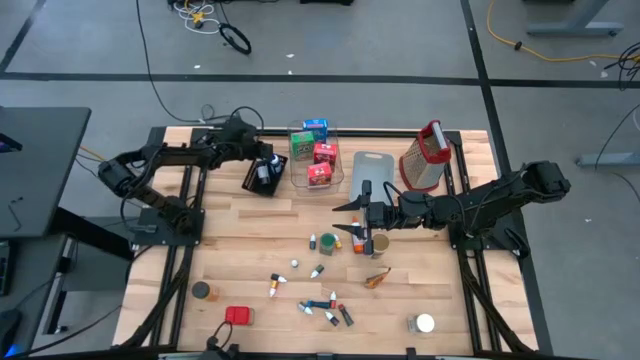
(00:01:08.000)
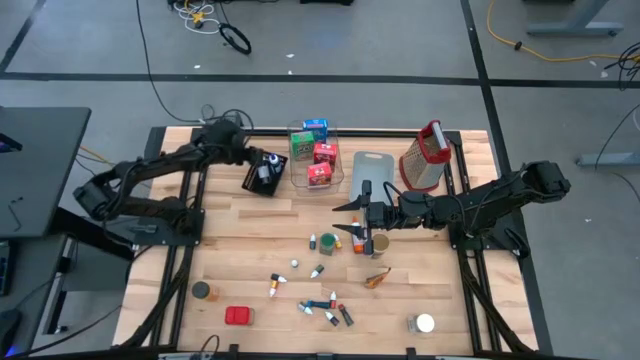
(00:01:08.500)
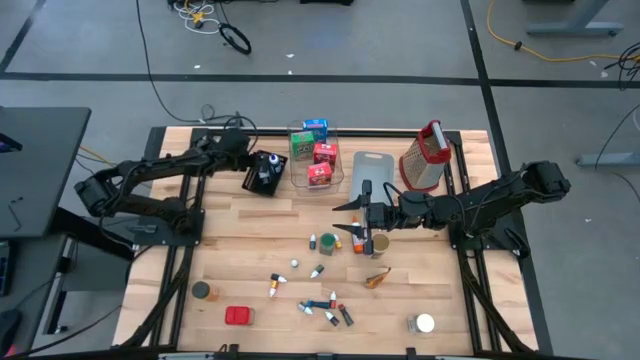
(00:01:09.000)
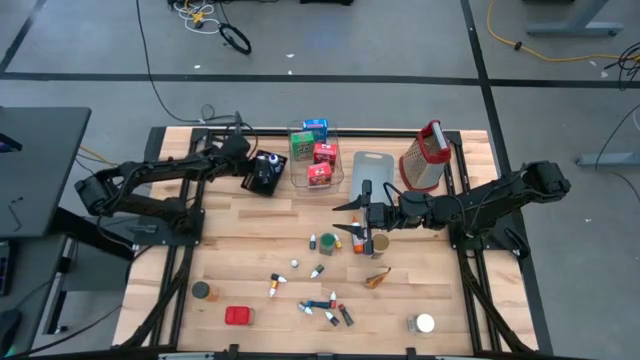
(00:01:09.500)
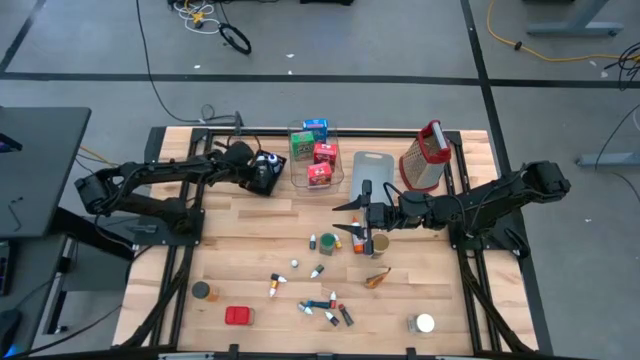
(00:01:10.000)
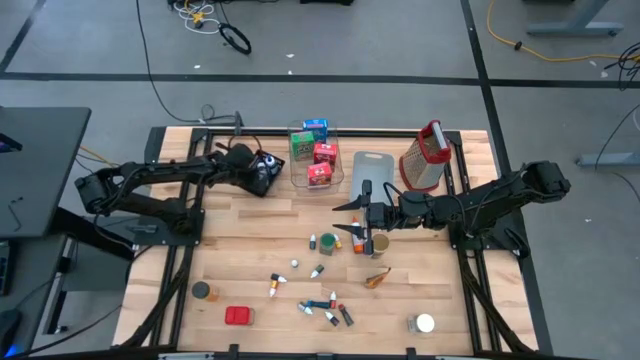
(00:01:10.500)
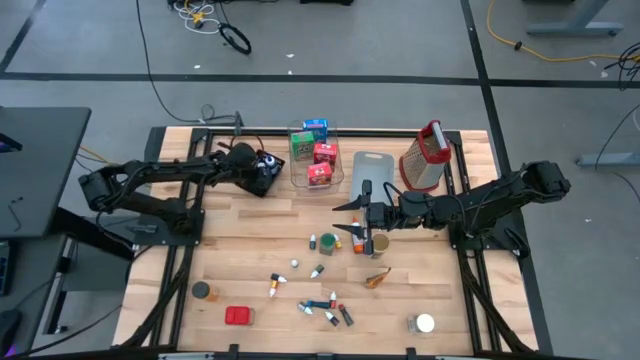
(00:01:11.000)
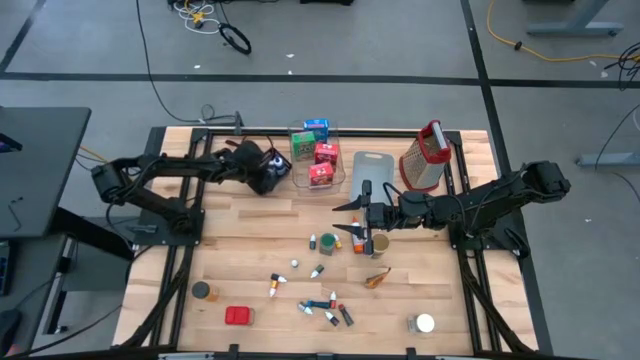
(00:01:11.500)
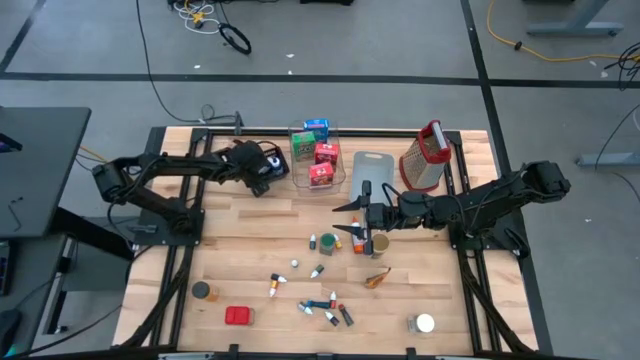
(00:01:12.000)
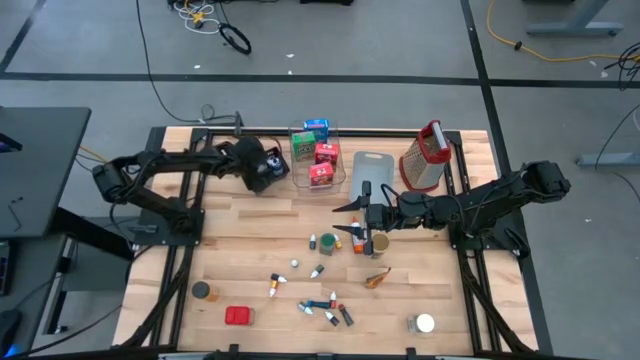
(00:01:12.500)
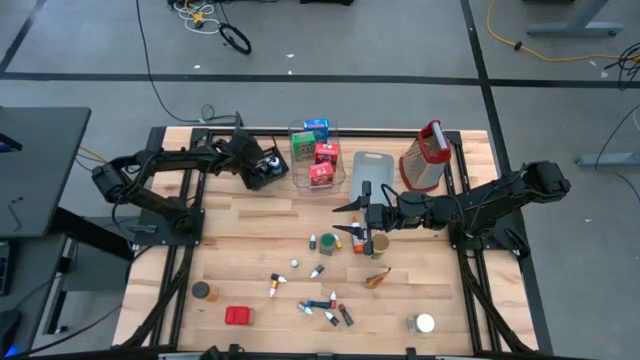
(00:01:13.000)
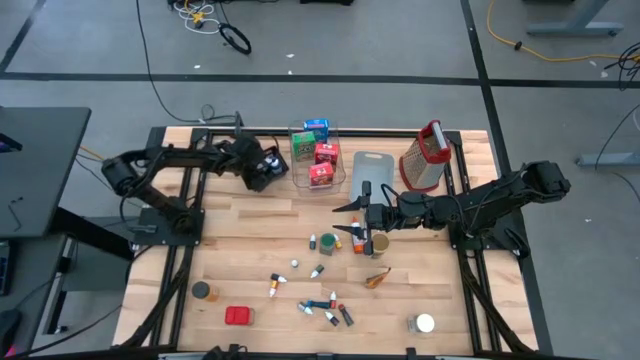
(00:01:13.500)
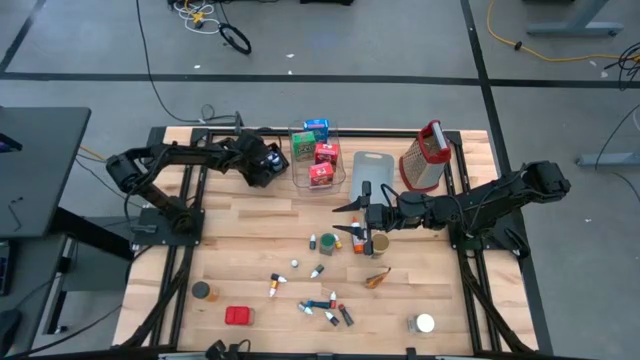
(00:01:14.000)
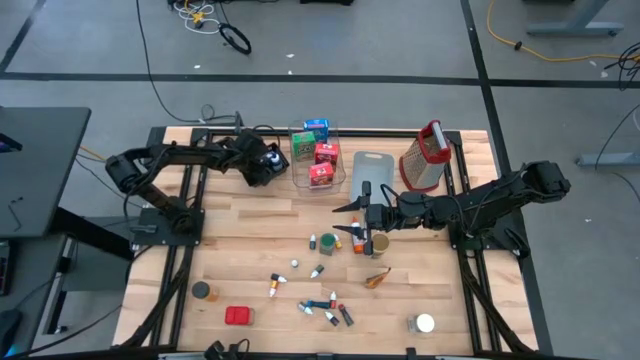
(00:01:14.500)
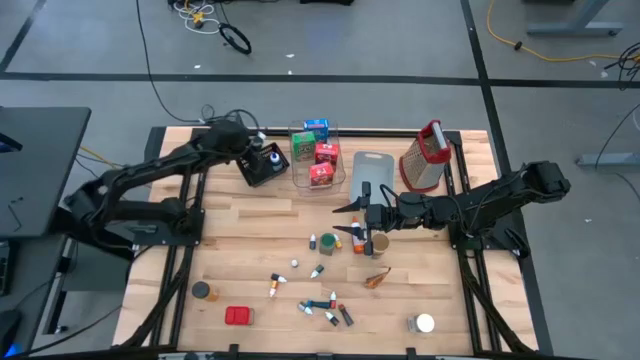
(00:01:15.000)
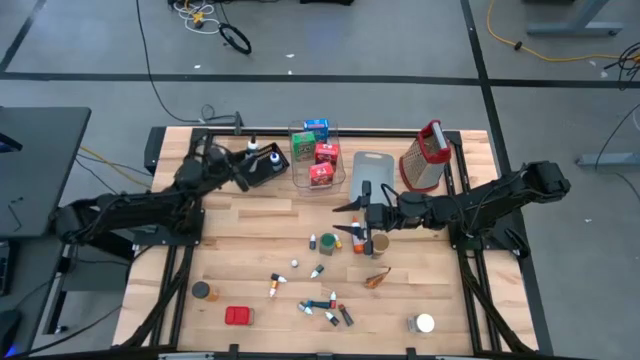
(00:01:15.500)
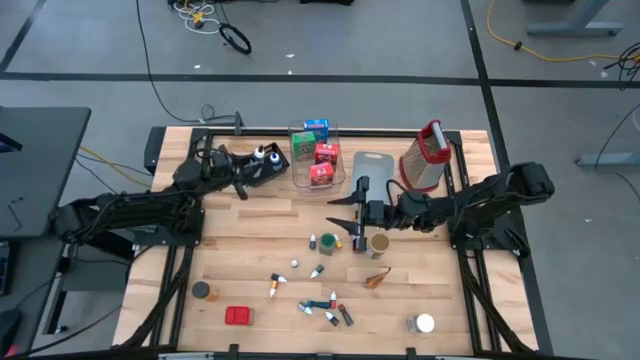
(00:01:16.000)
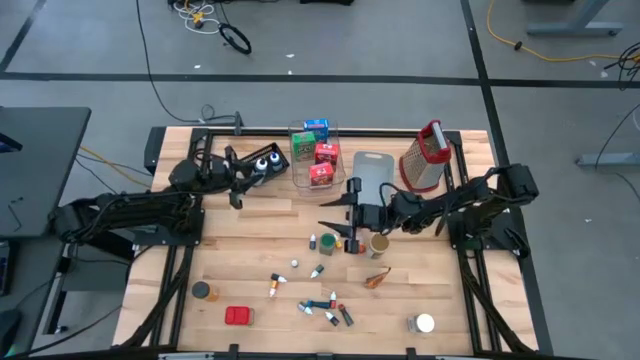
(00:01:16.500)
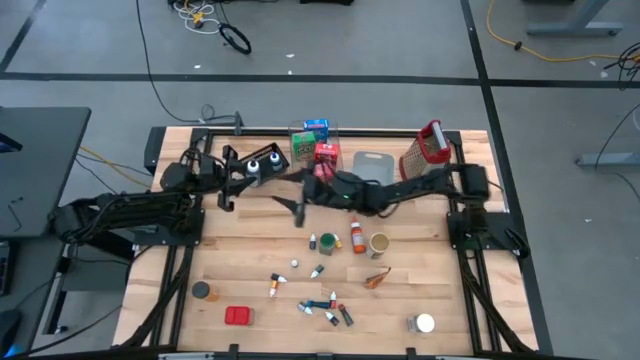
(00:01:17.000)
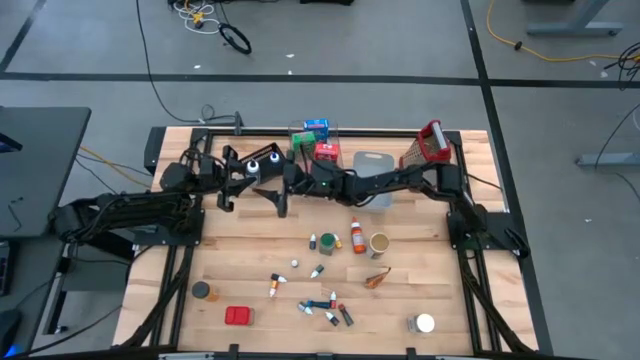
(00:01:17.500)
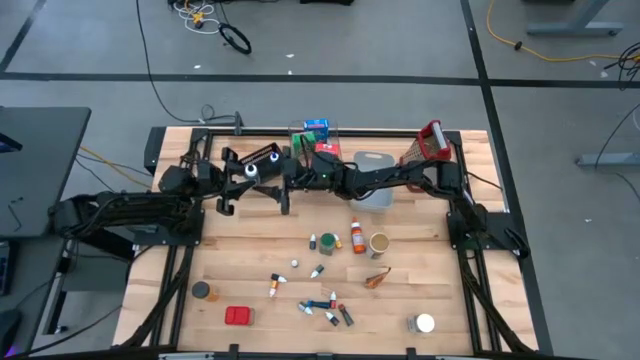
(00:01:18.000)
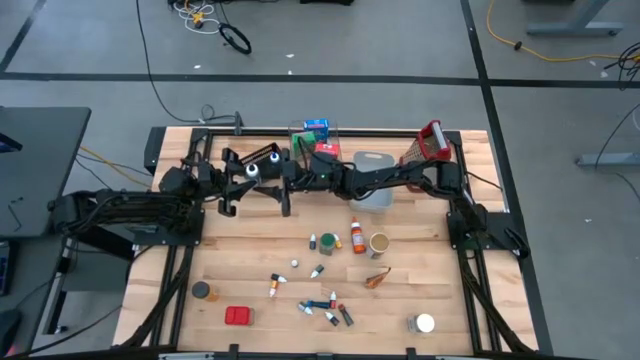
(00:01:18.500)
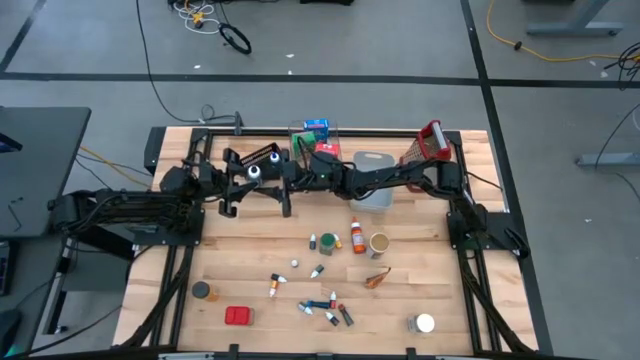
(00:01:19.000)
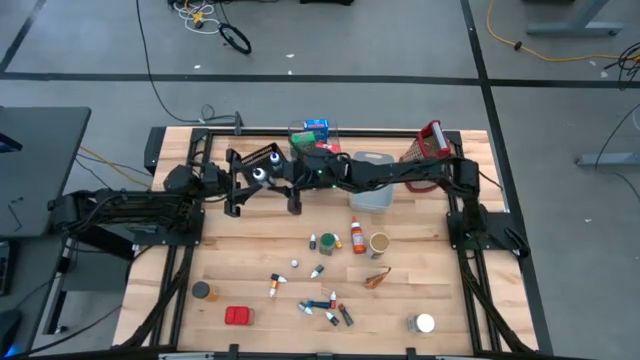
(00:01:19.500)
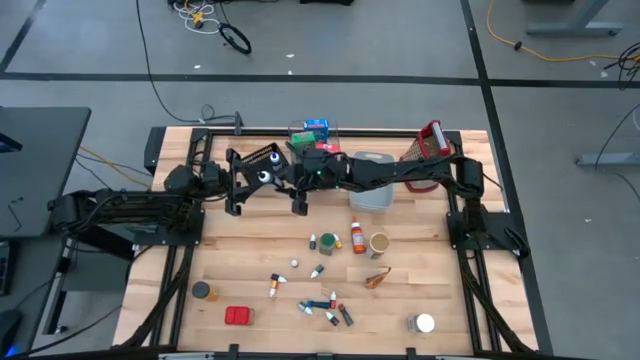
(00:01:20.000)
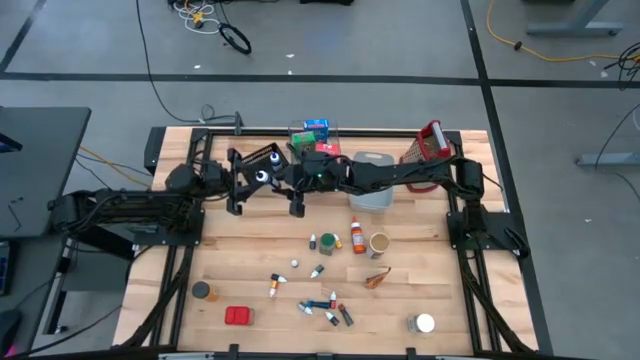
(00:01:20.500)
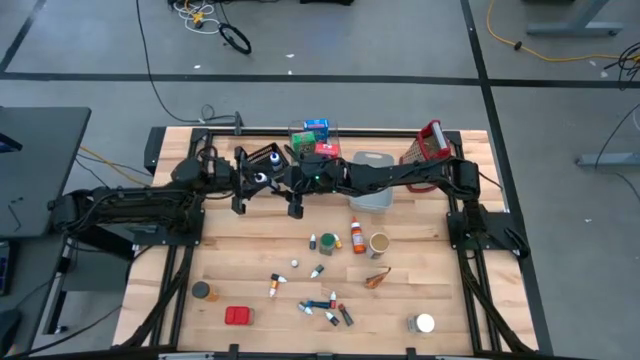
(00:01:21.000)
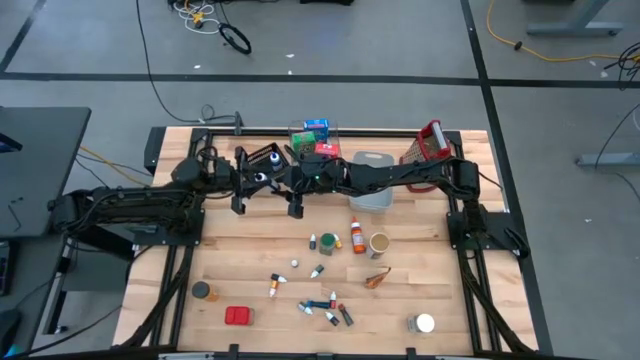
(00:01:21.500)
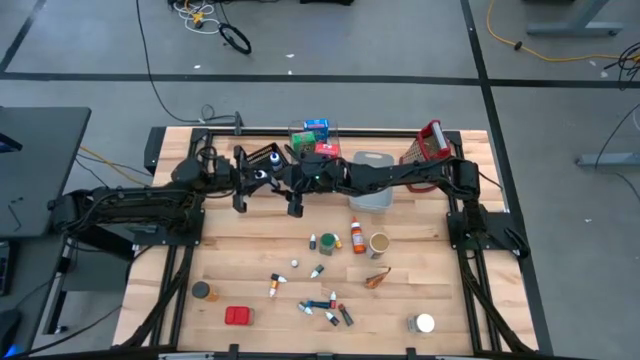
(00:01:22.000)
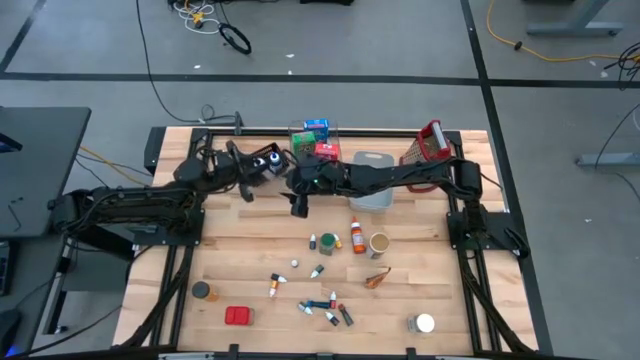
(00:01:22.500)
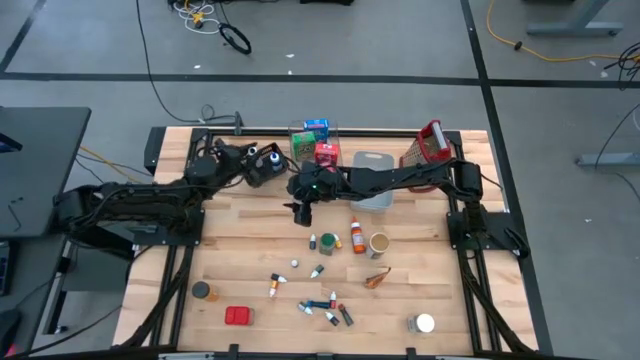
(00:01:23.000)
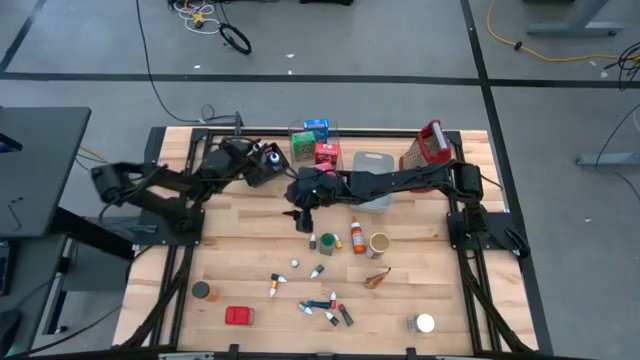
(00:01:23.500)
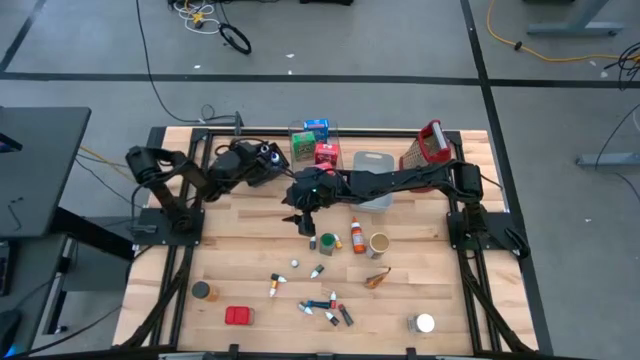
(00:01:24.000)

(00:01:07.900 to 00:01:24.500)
Task: Pick & Place Kitchen Items
Put the large black food coloring bottle into the black bin

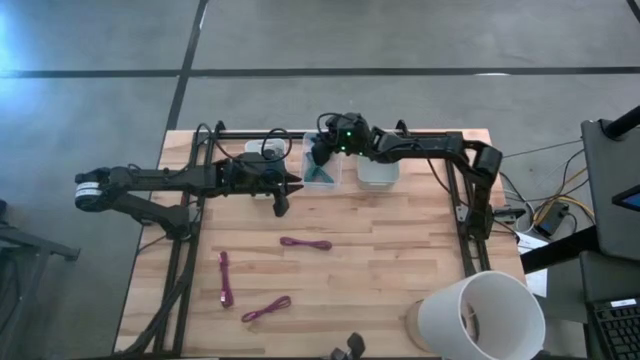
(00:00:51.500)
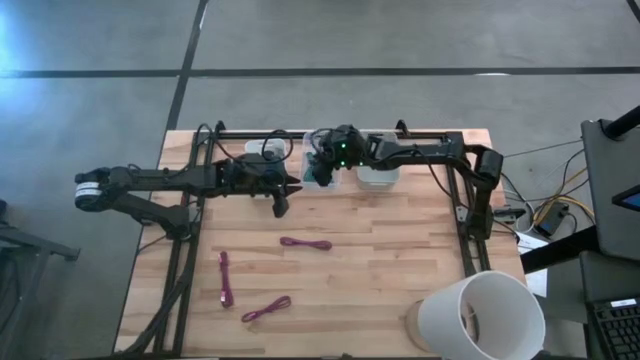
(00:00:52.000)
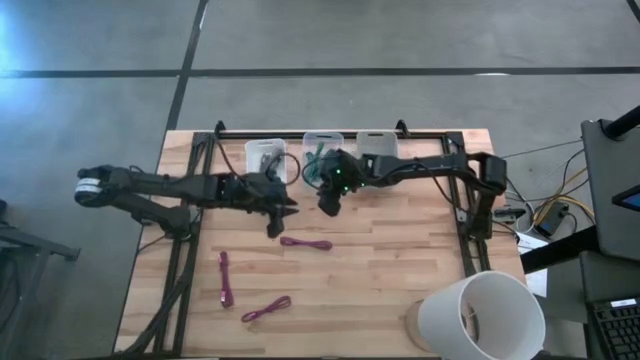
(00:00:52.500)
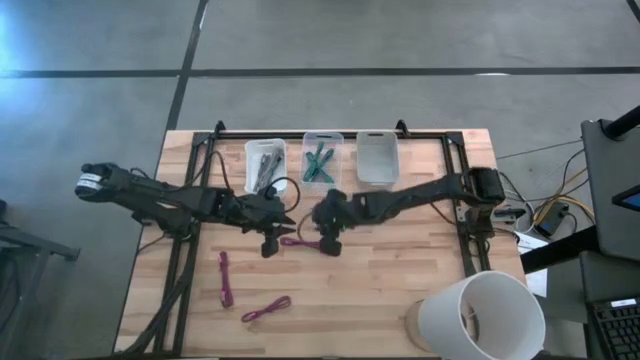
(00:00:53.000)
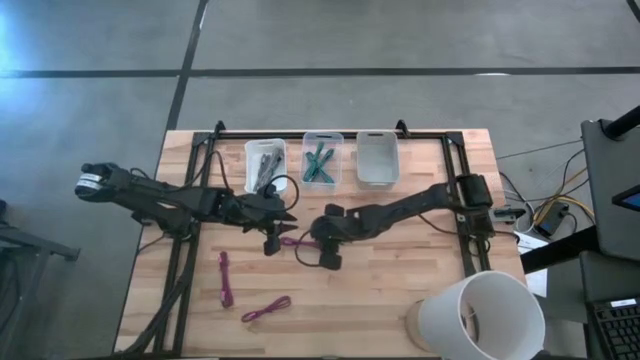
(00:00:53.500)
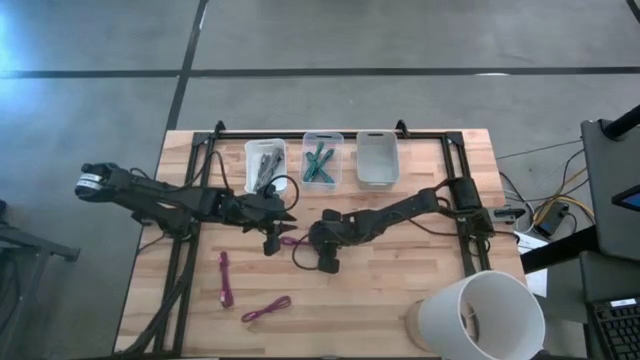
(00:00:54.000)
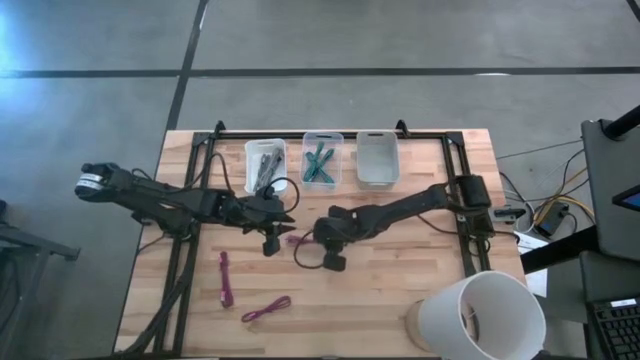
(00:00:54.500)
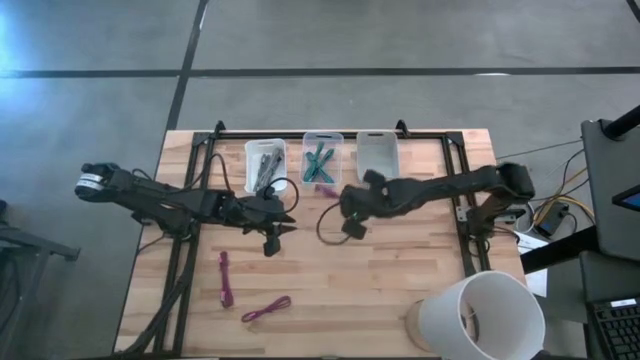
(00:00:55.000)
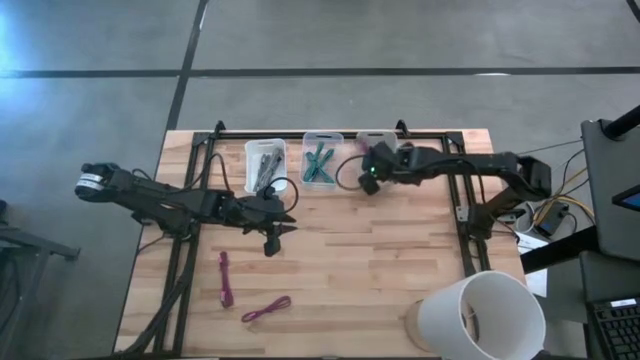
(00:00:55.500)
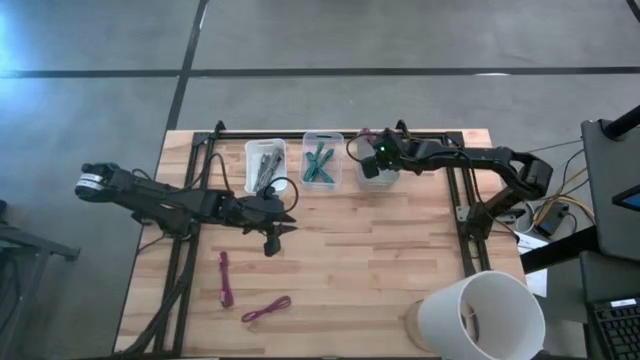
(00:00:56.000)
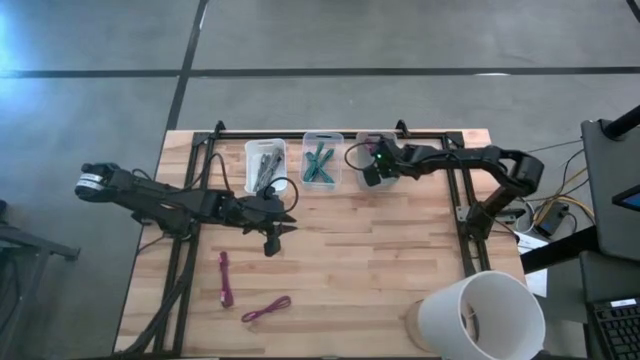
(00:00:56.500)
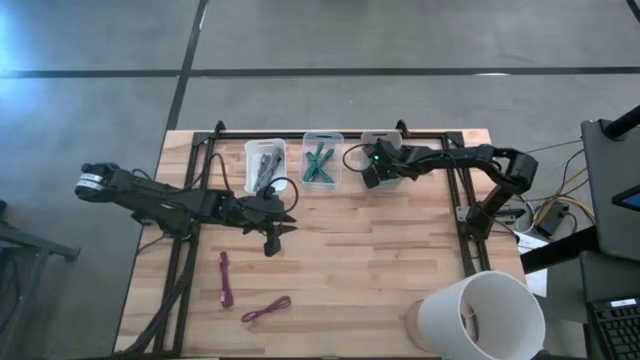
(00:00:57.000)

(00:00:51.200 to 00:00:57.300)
Task: Pick & Place USB Port
Put the top right pink charger cable into the gray bin
